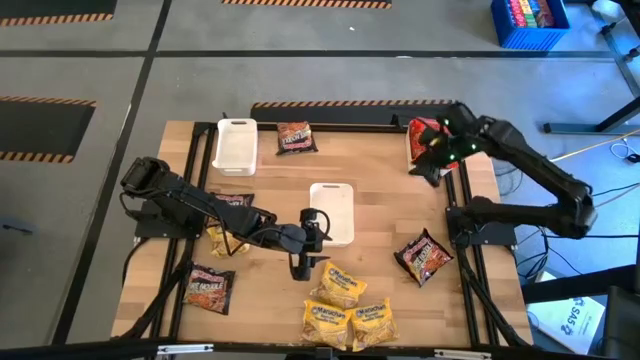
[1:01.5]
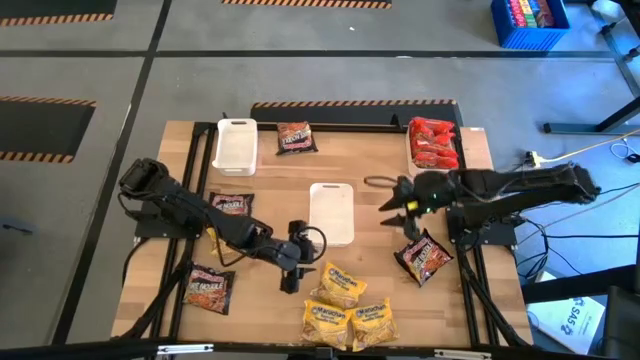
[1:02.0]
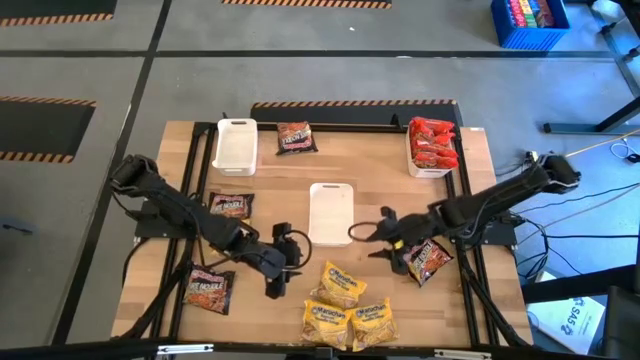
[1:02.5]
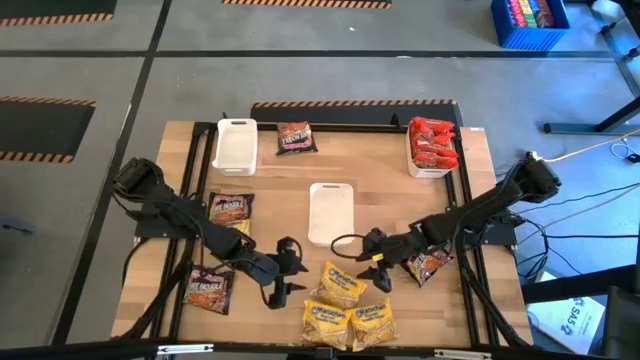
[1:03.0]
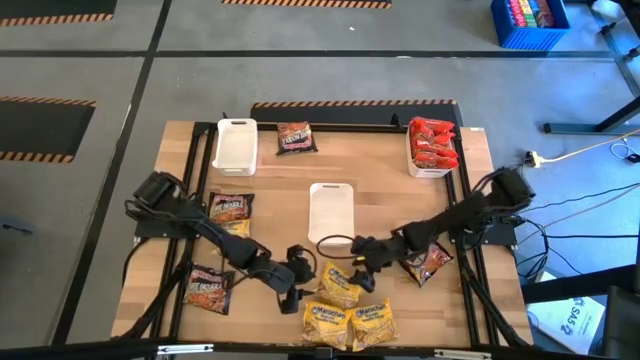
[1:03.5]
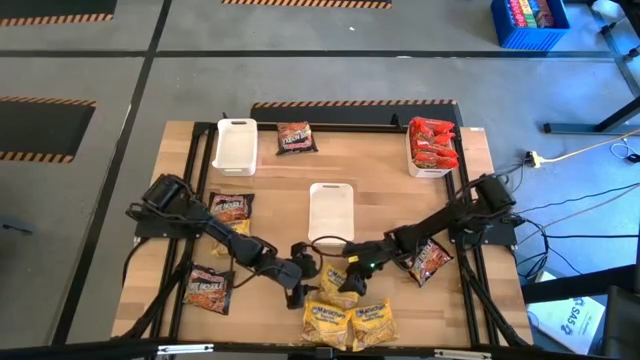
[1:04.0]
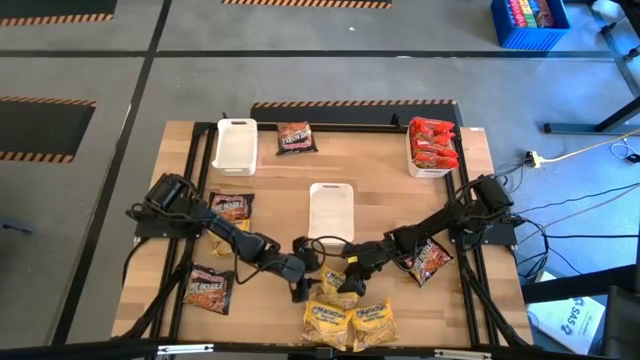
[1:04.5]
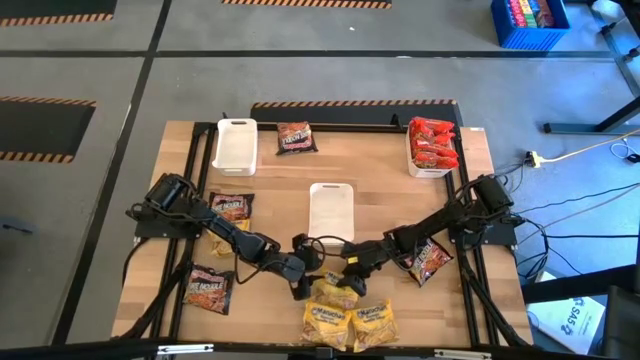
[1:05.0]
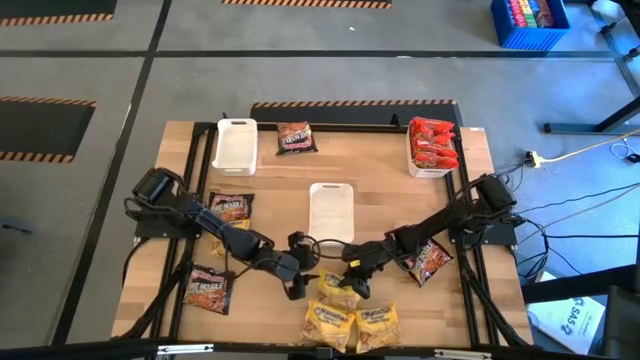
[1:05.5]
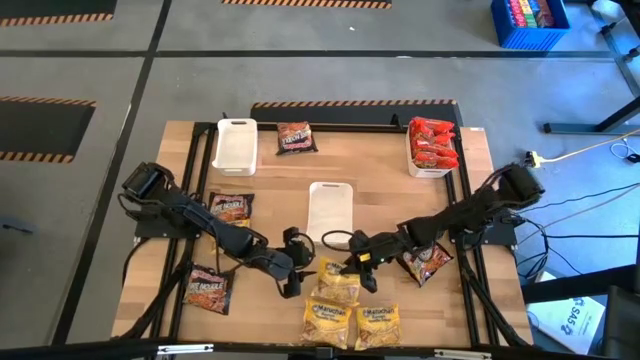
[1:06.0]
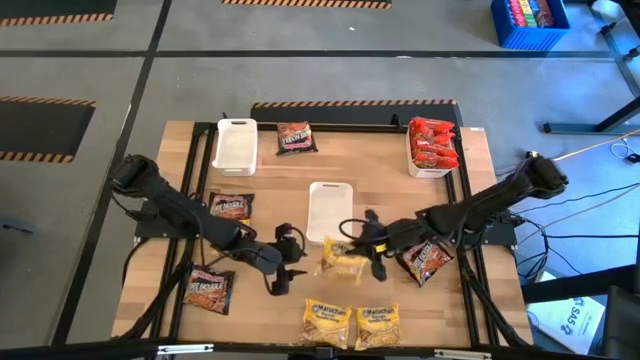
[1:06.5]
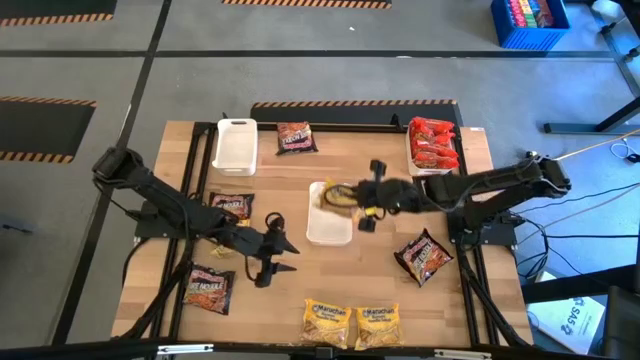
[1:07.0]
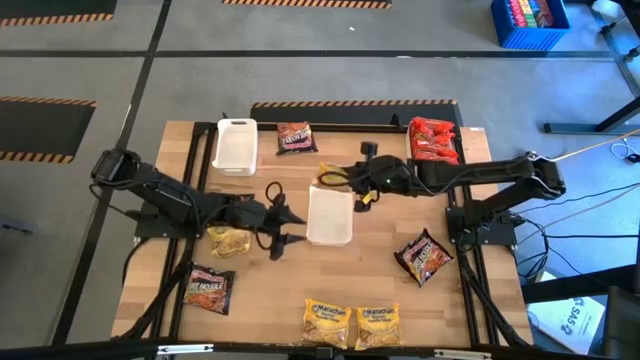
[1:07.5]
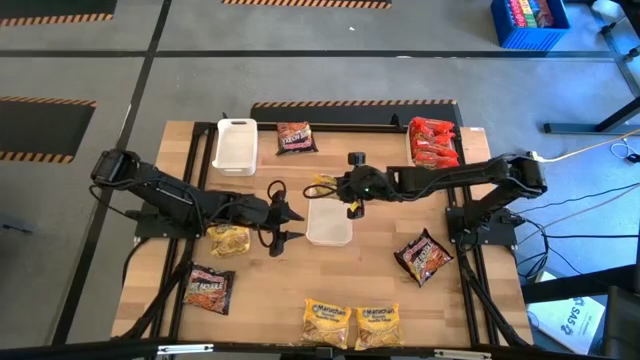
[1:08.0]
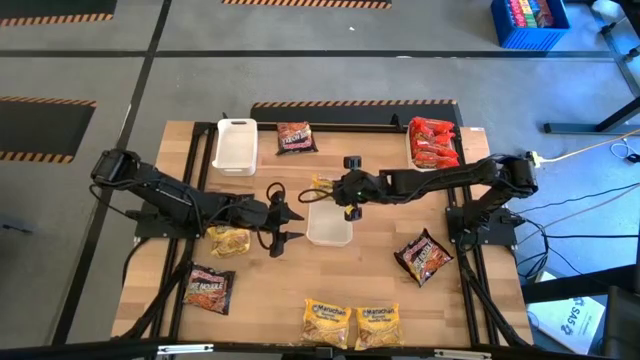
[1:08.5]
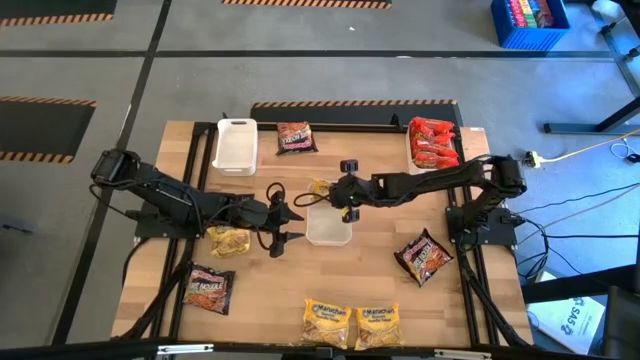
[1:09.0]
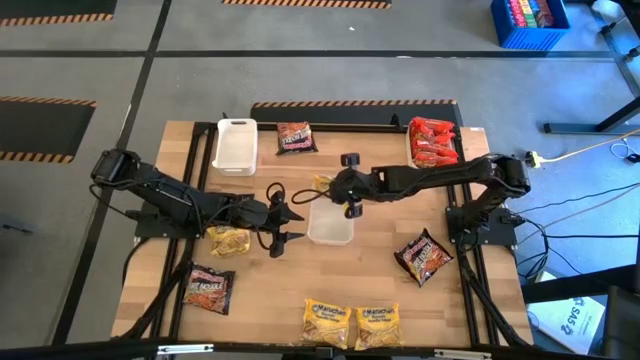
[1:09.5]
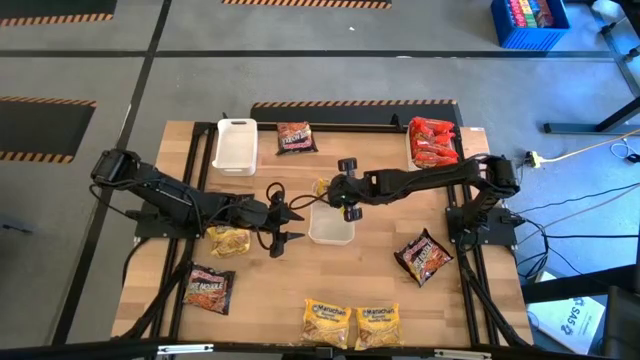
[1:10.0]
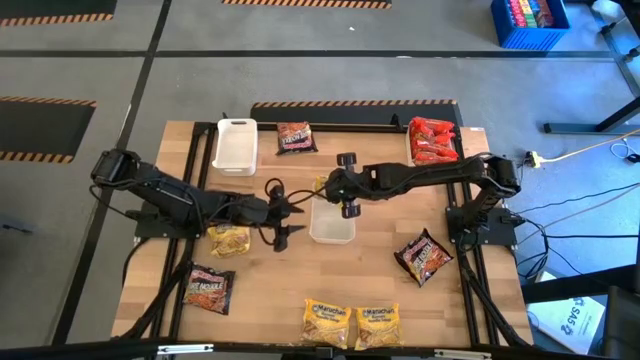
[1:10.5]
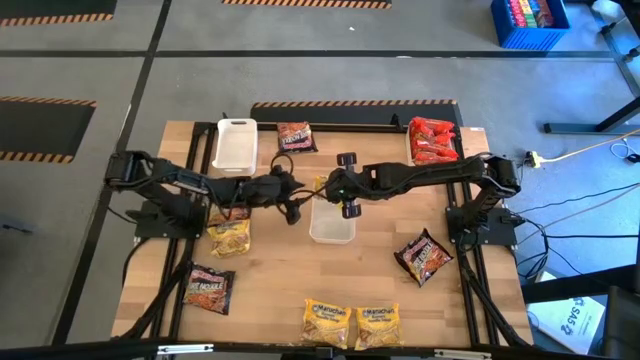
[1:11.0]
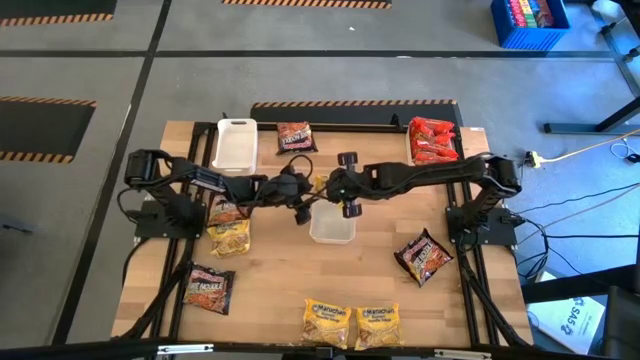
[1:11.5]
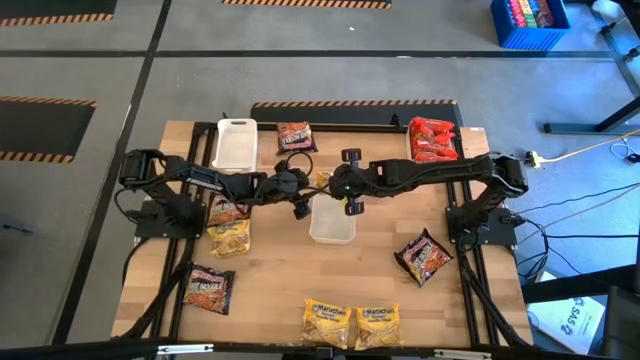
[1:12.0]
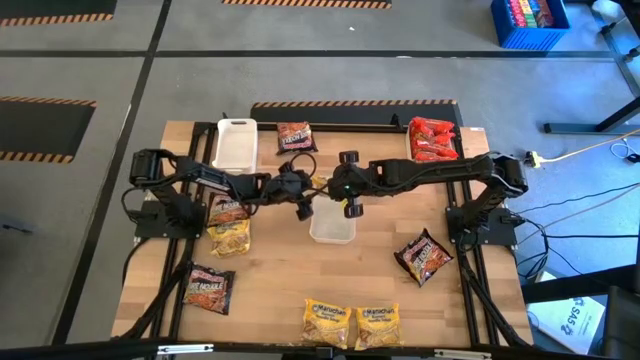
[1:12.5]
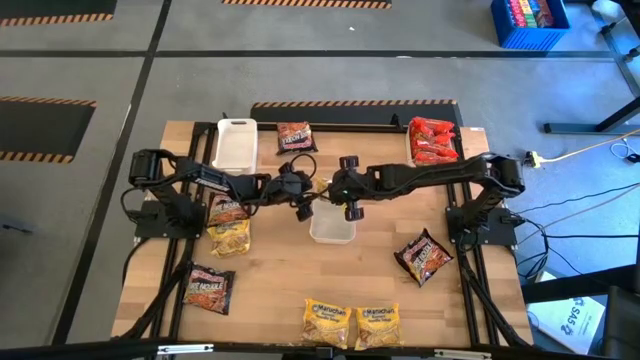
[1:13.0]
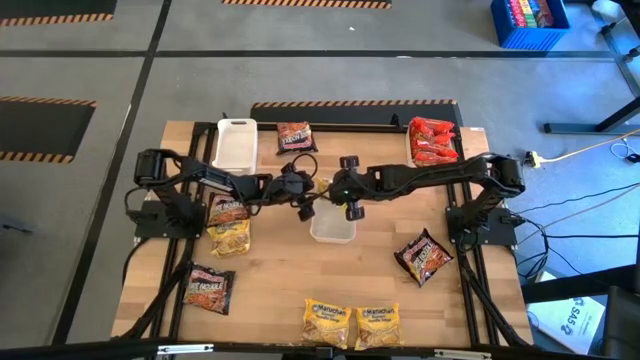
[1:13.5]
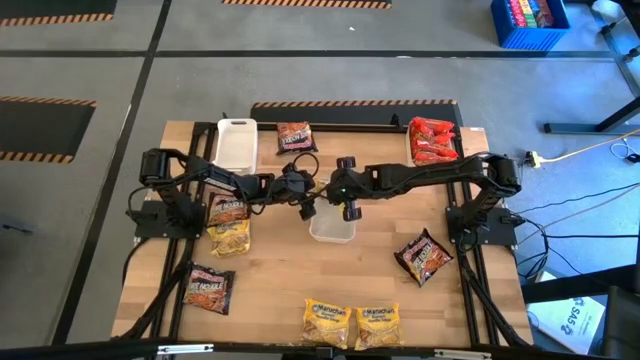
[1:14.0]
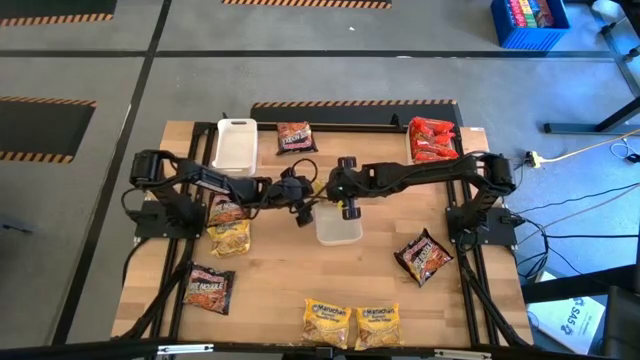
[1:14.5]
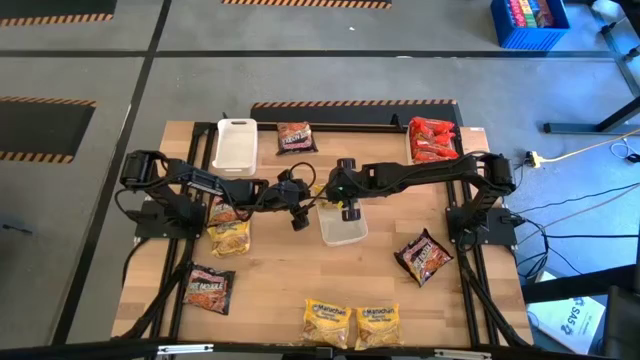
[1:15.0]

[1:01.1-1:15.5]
Task: Sort Maruchan noodles
Put the yellow noodle pack into the white middle bin

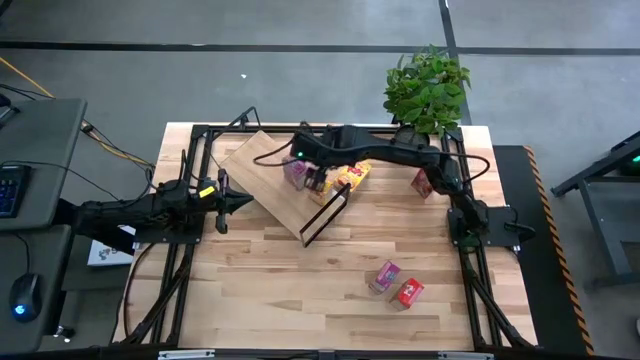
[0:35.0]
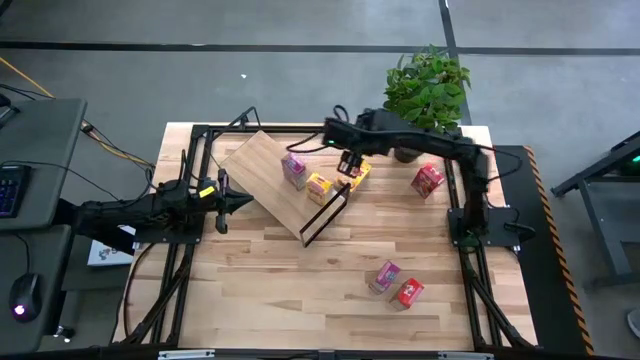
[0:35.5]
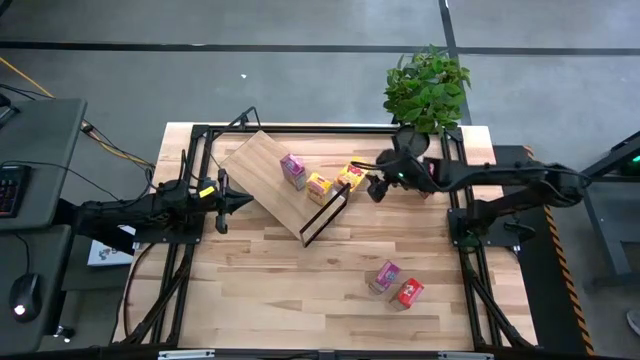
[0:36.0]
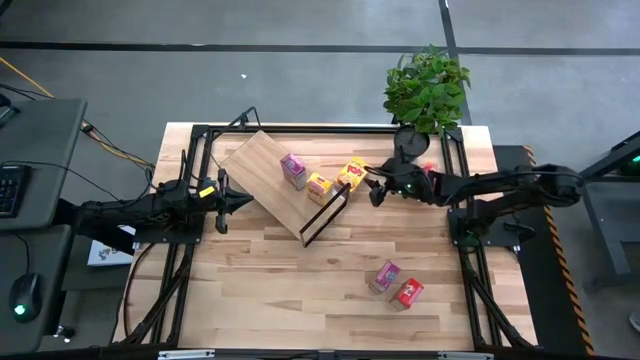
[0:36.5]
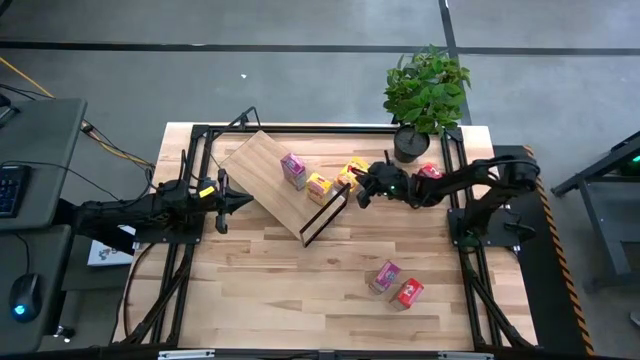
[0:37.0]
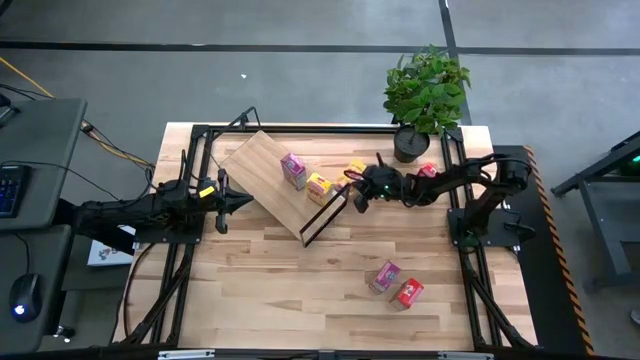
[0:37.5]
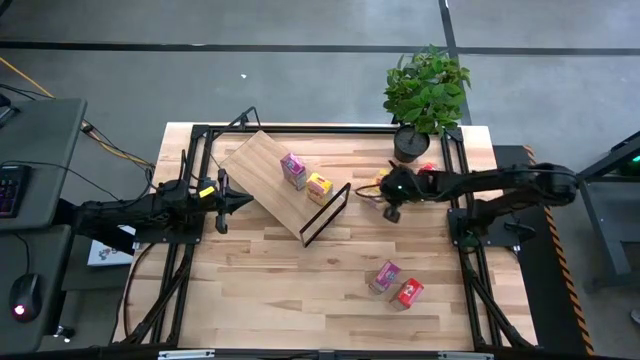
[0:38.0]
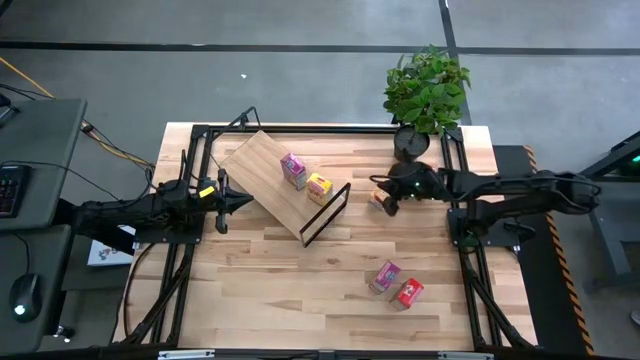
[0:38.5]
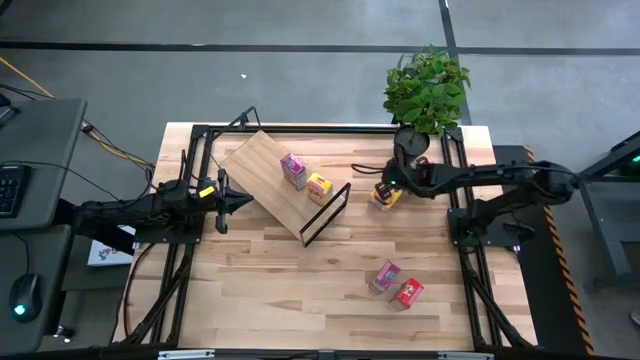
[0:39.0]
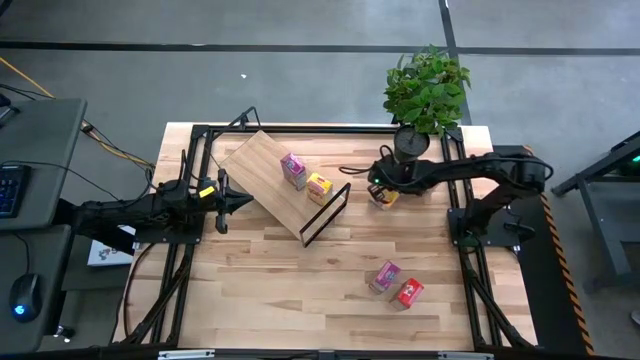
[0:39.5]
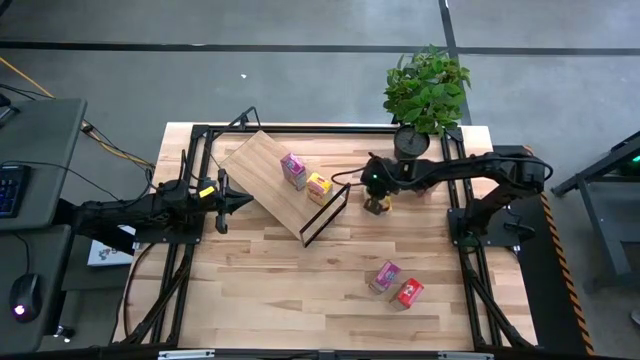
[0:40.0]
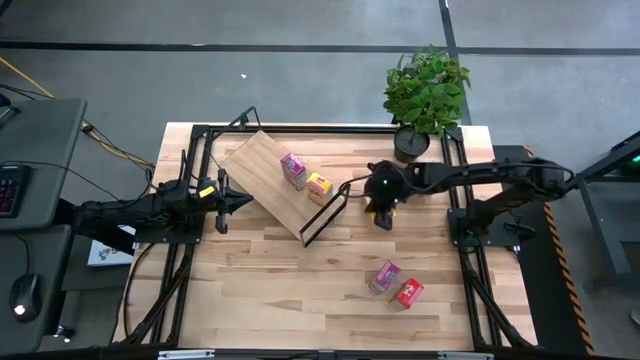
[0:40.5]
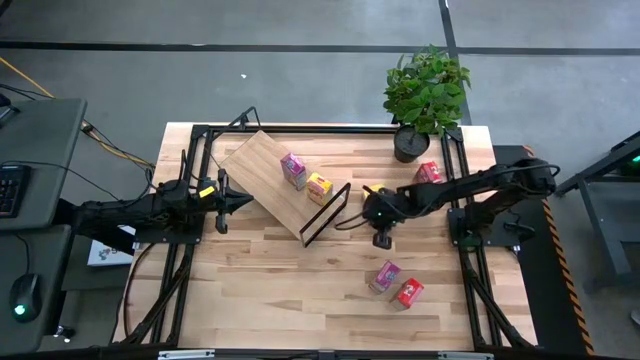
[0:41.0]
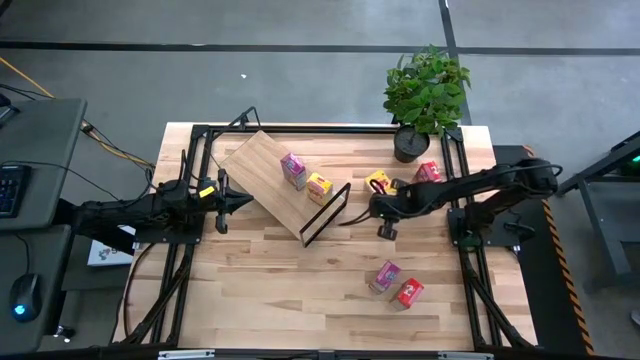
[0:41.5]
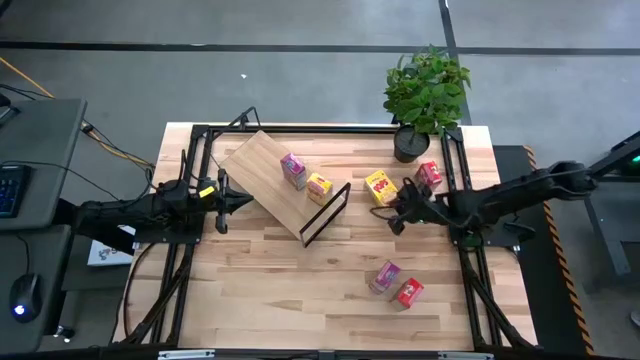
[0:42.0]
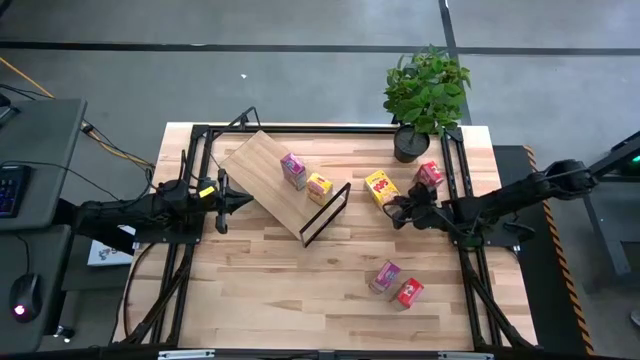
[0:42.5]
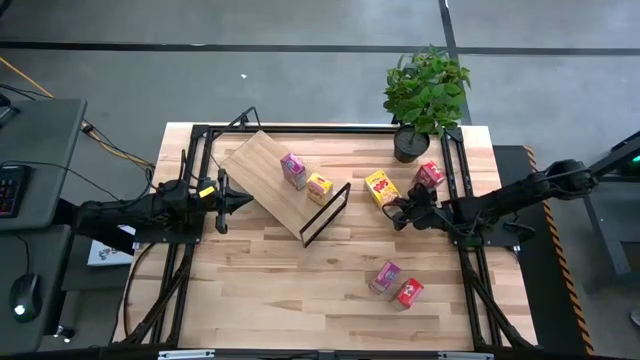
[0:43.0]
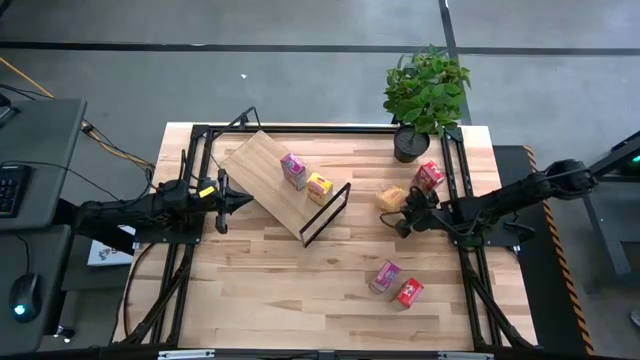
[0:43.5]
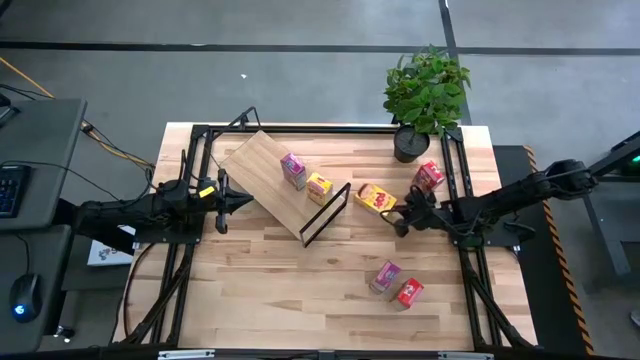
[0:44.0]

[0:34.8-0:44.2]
Task: Stack cereal on shelf
Put the yellow cereal on the shelf aligned with the other yellow cereal box
